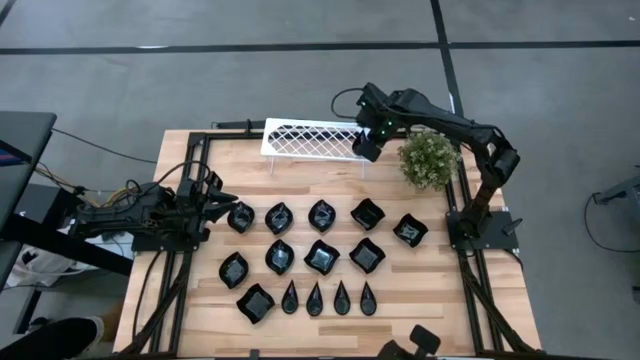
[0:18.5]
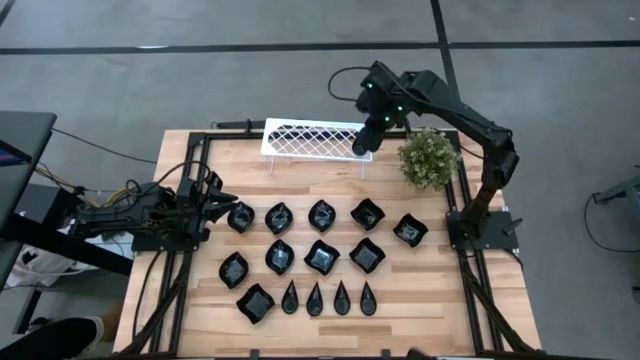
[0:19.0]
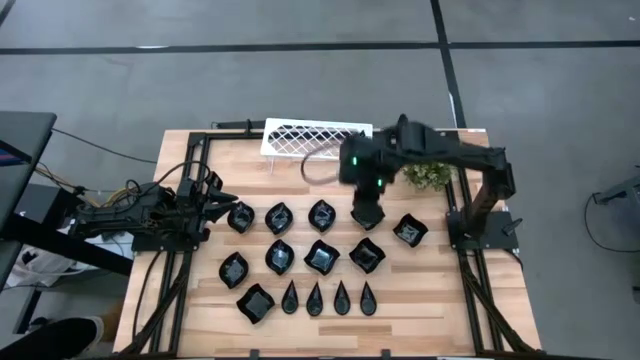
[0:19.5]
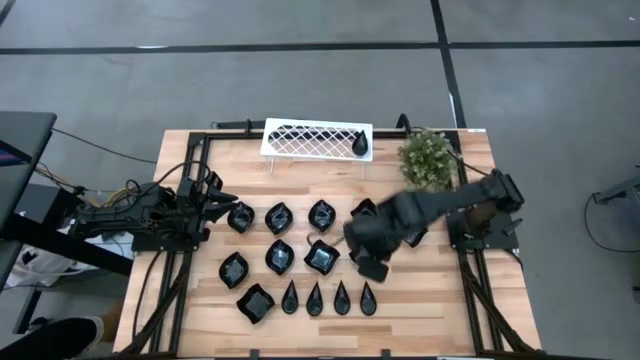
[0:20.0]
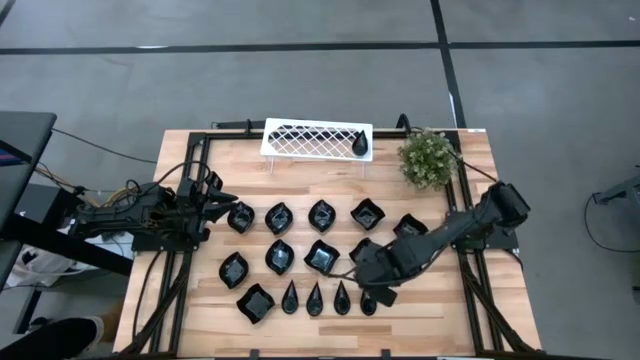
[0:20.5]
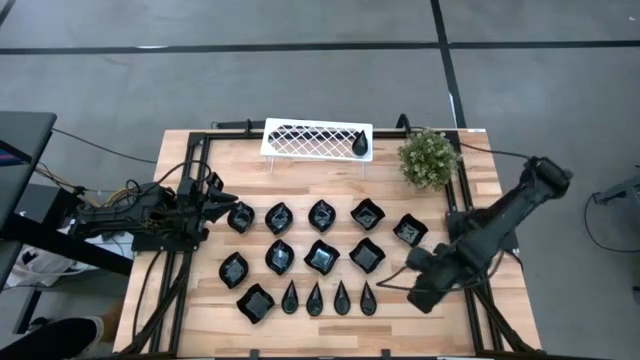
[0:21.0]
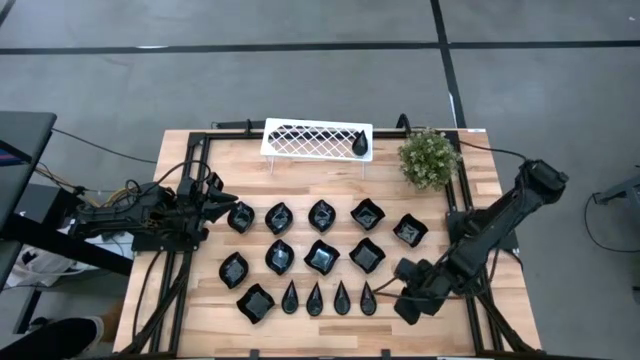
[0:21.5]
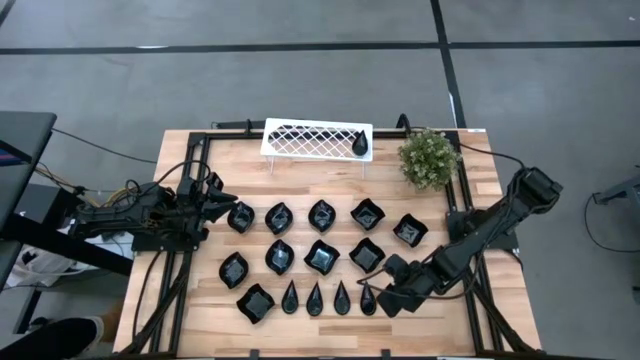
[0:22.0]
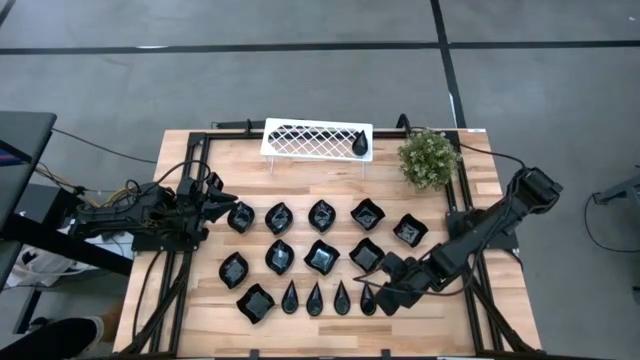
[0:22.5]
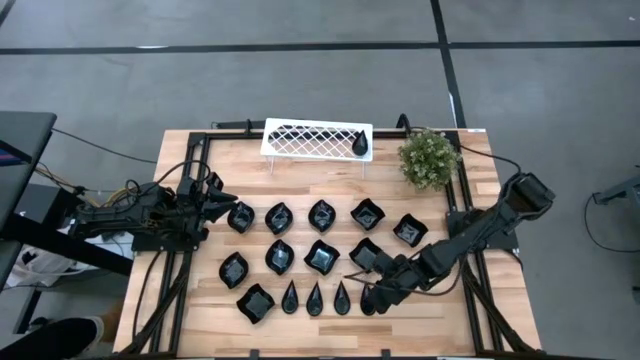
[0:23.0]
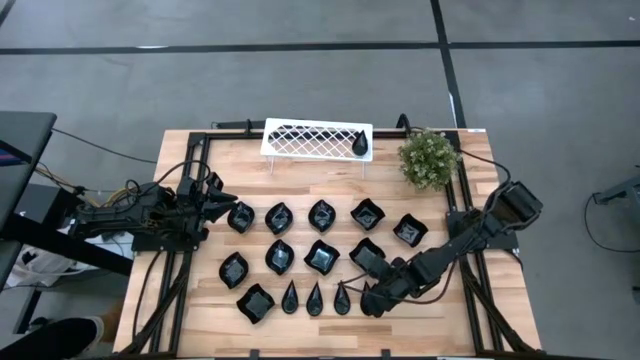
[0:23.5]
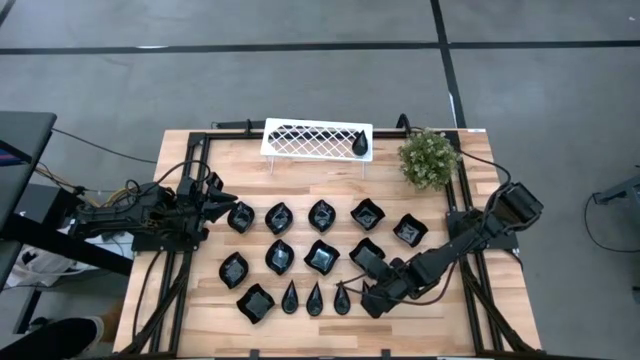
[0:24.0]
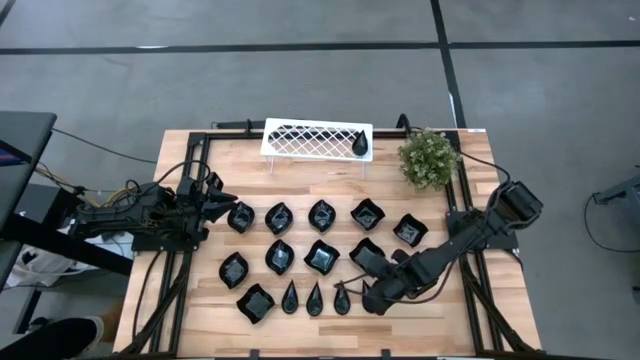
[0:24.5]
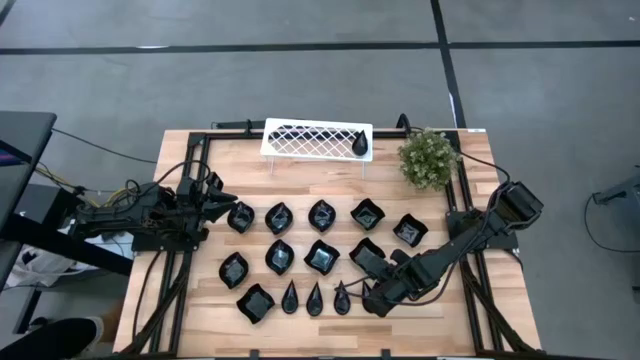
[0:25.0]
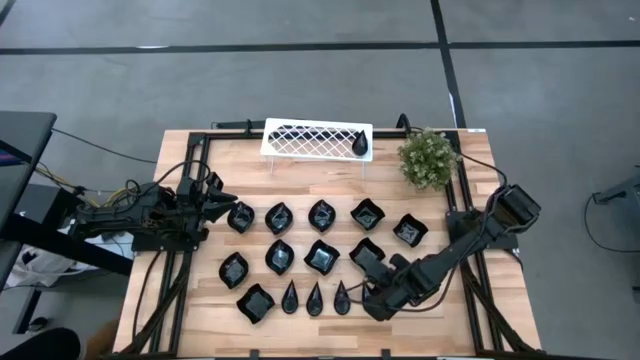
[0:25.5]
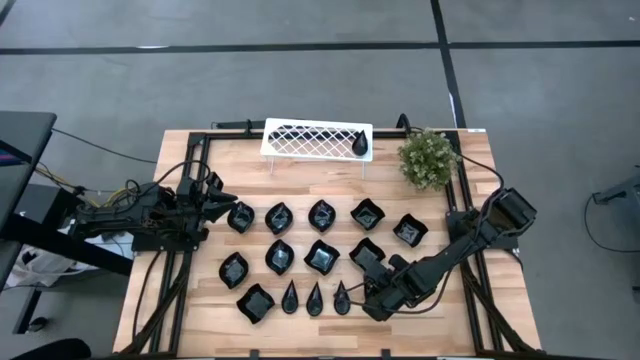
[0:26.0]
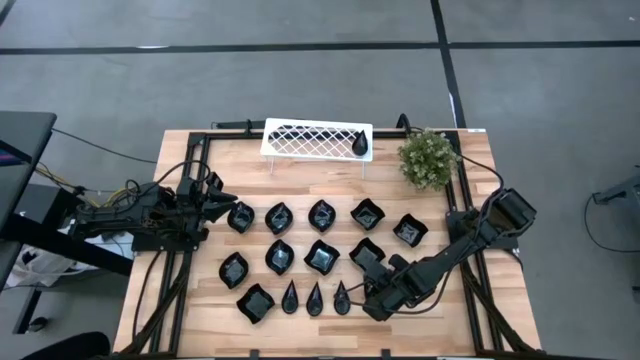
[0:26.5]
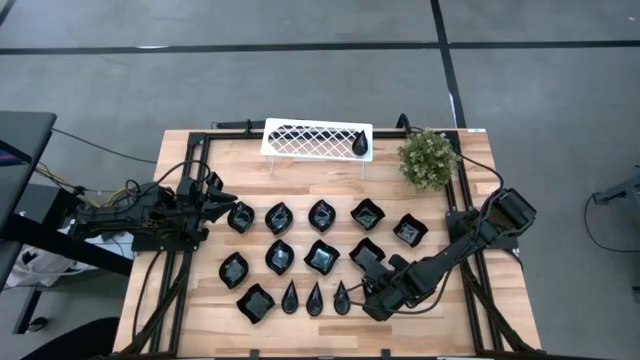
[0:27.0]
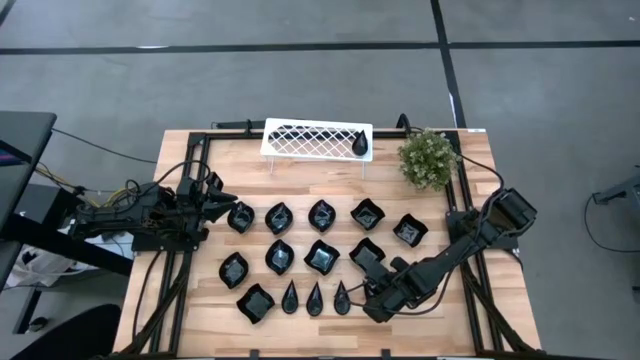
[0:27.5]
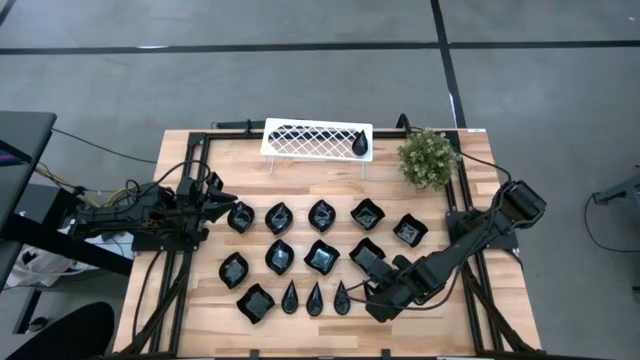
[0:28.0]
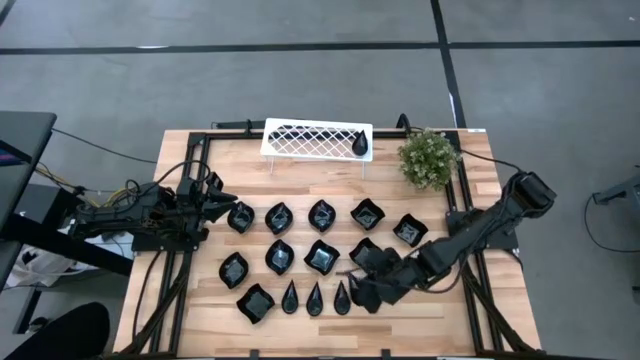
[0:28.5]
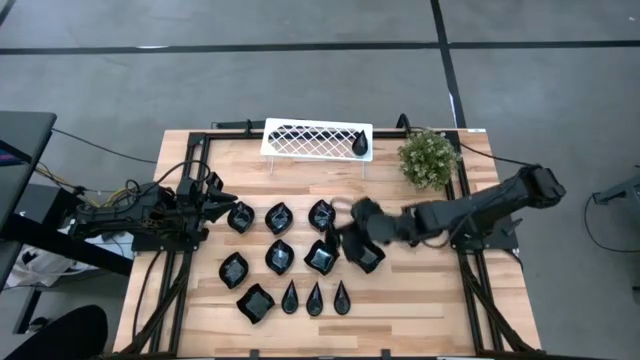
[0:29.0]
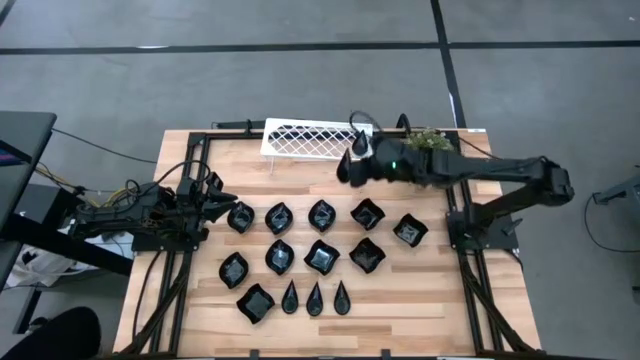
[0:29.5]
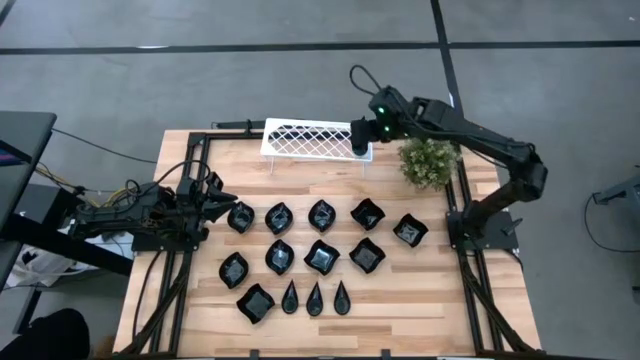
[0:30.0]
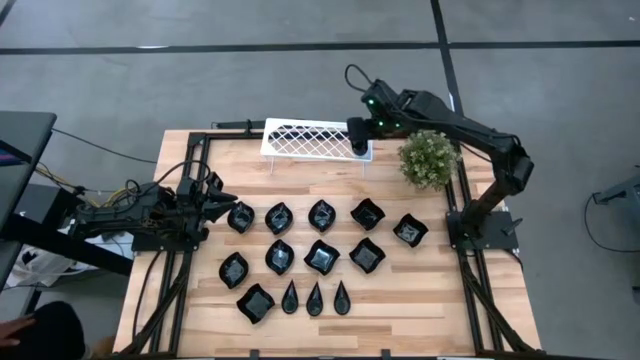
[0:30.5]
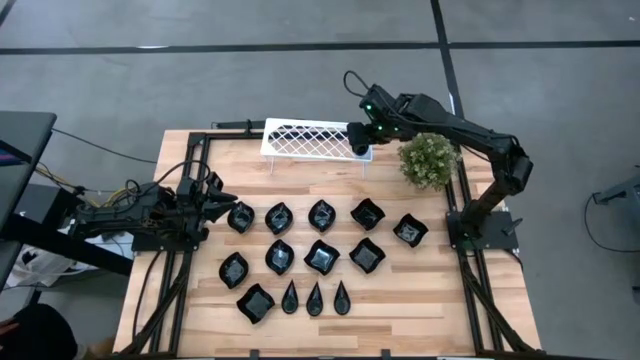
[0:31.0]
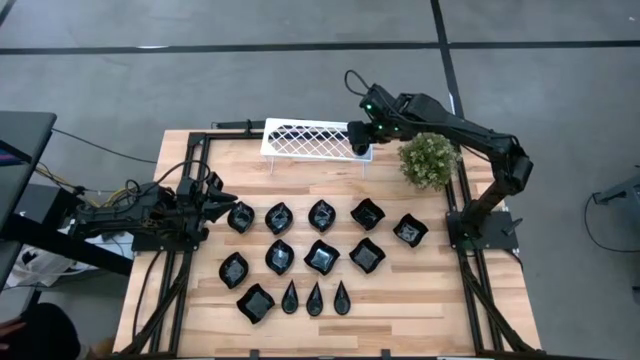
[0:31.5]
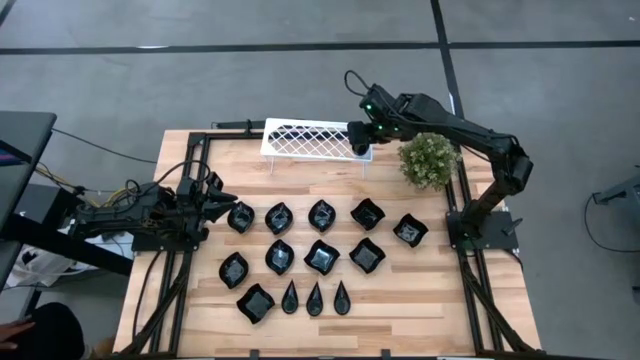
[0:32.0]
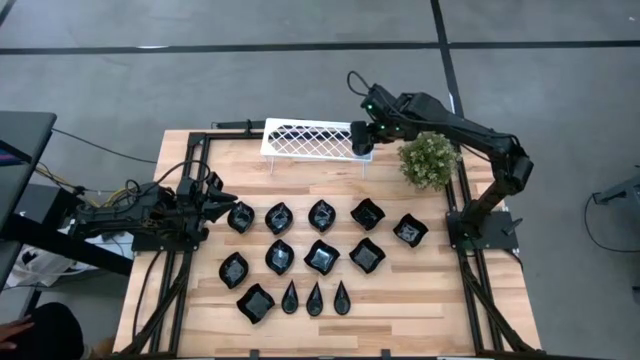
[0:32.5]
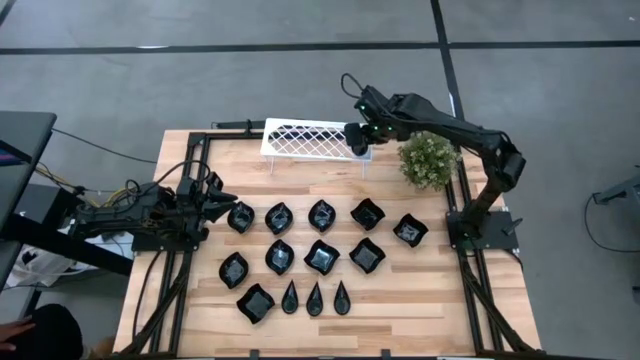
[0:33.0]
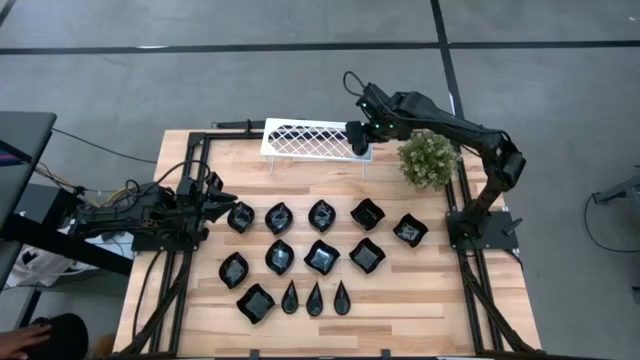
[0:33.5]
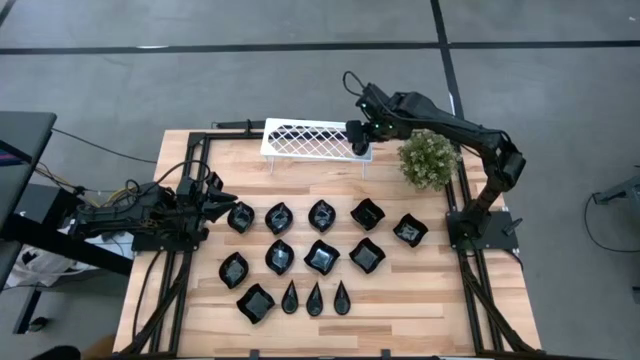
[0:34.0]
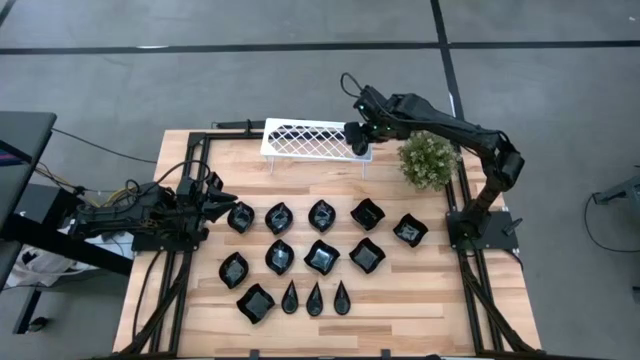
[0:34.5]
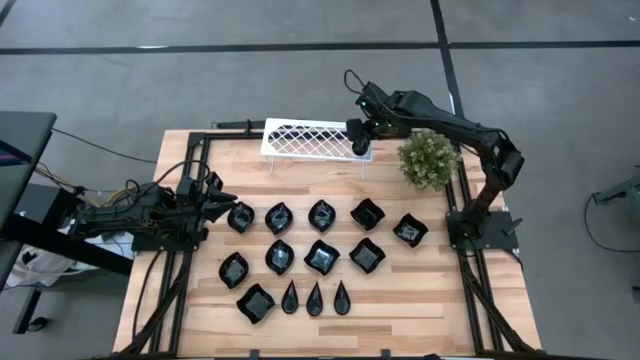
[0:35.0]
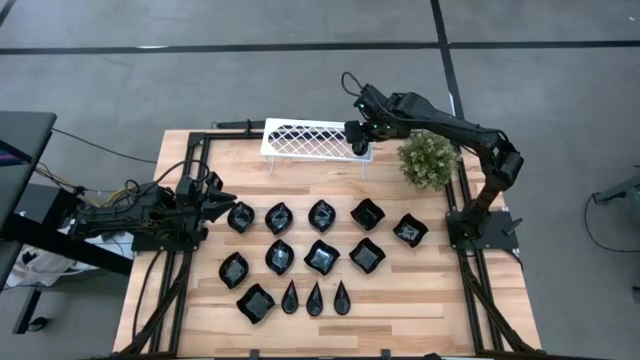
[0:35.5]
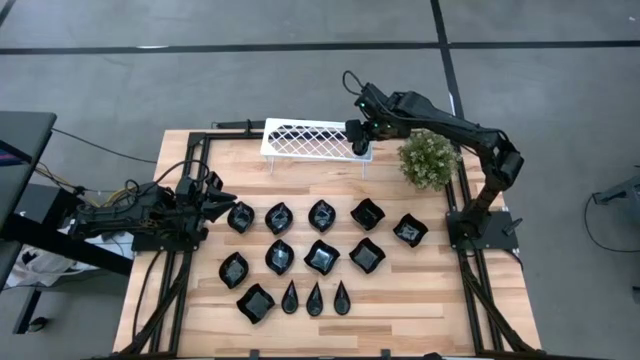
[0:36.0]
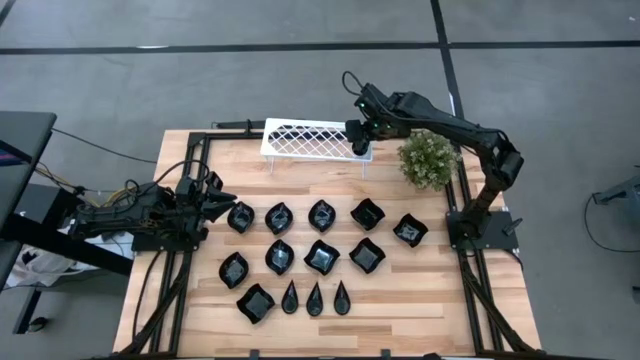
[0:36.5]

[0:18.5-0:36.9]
Task: Pick & Place Mini shaped plates
Stack the black drop shaped plate on top of the black drop shaped plate on the shelf

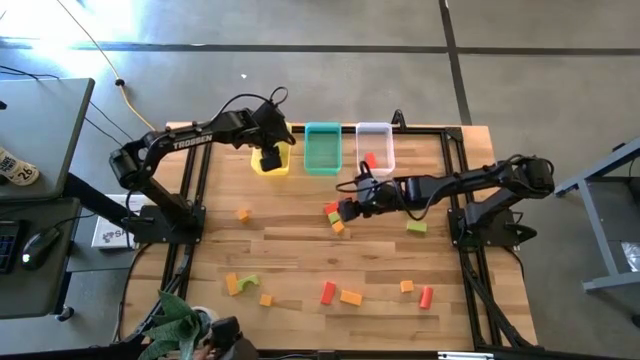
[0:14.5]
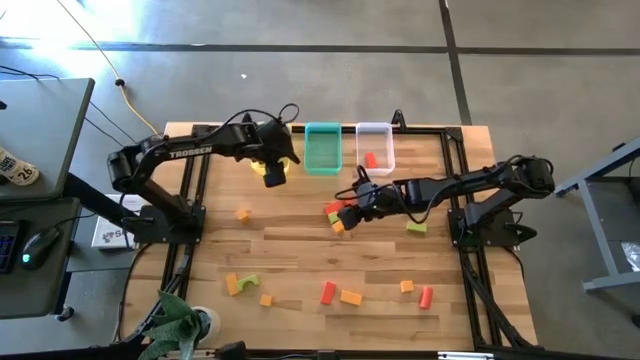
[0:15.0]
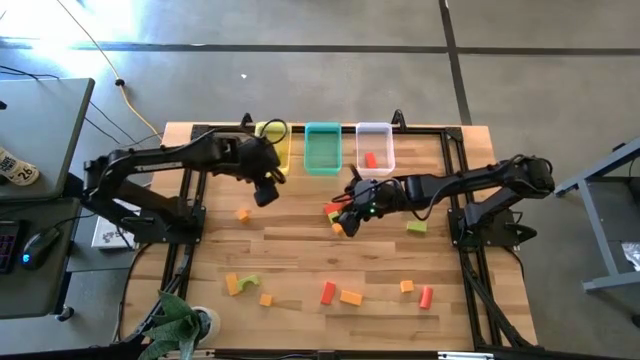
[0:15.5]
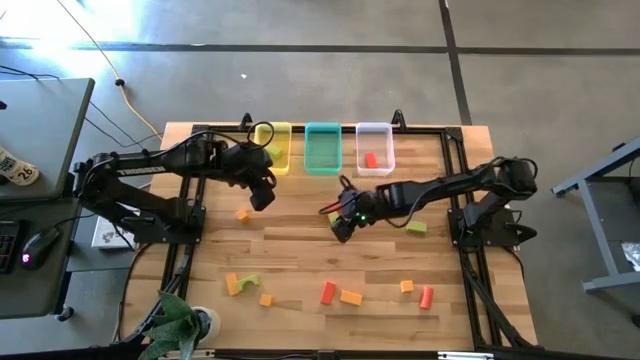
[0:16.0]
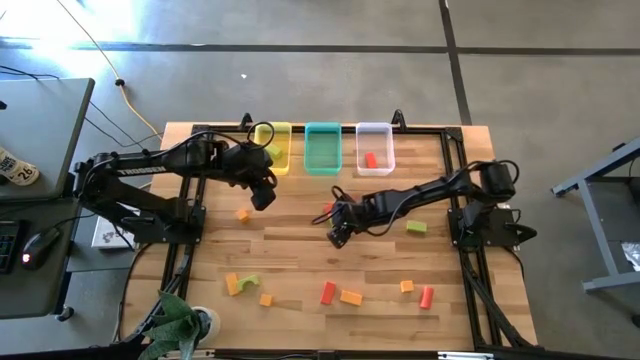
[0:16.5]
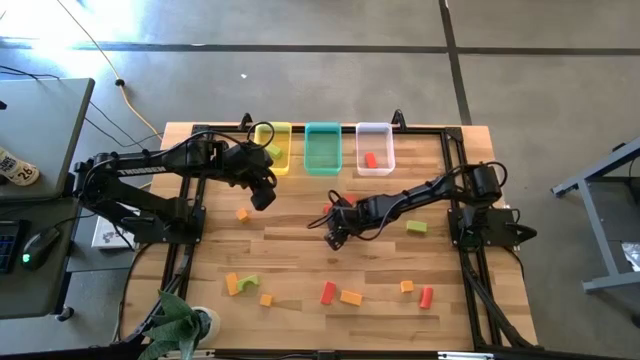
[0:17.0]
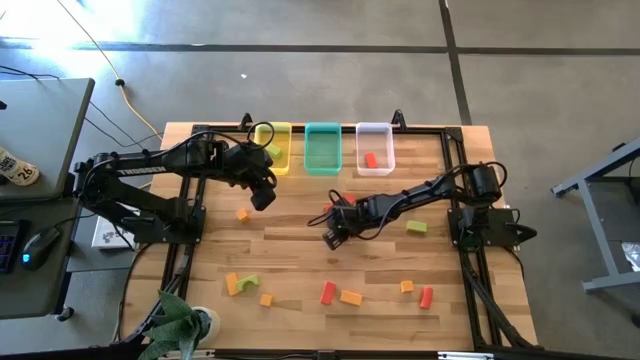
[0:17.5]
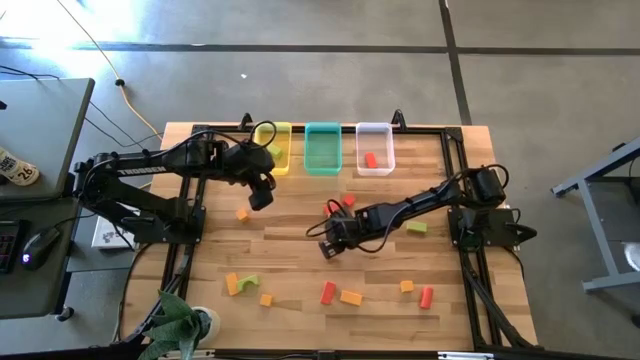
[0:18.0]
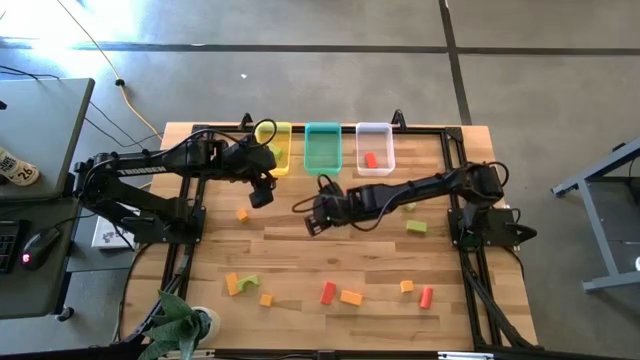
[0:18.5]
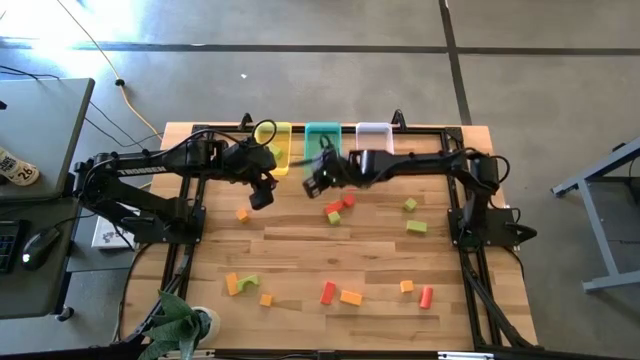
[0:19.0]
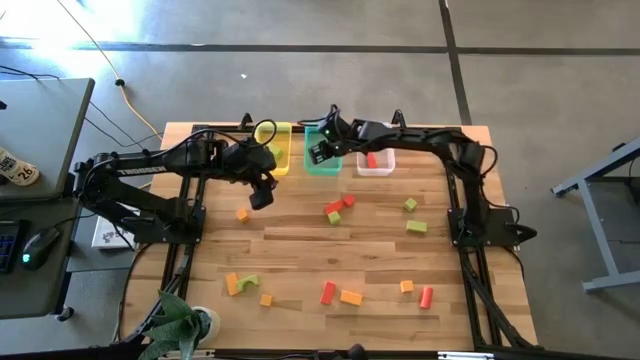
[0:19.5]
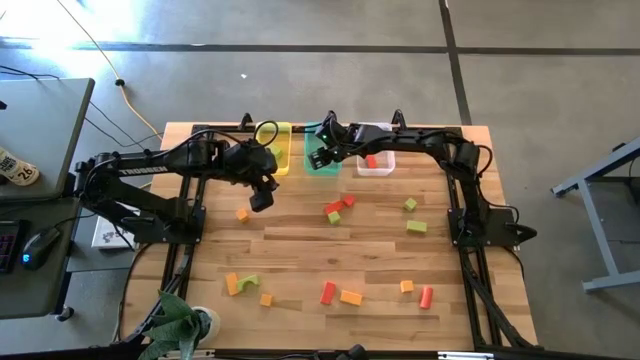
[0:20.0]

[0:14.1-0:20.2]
Task: Sort & place blocks by color
Put the yellow block into the blue bin
